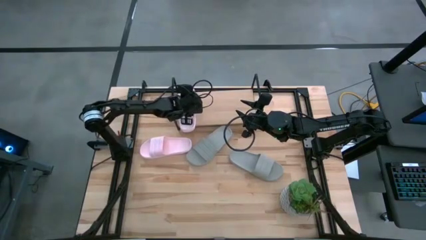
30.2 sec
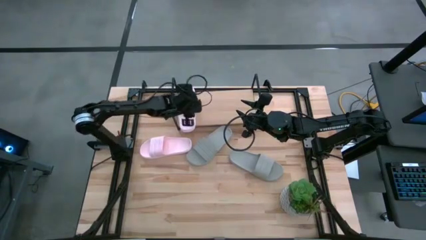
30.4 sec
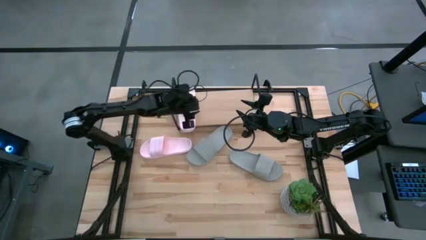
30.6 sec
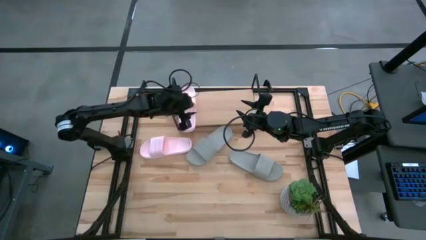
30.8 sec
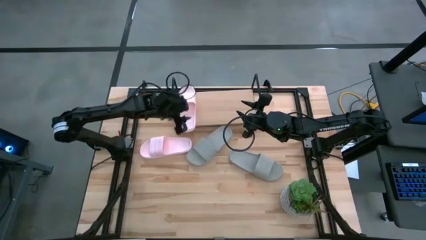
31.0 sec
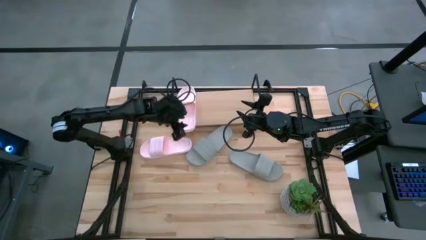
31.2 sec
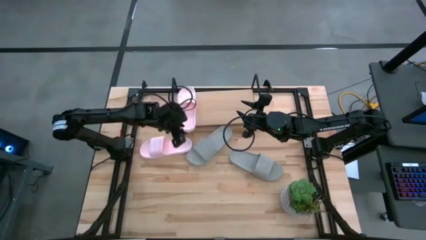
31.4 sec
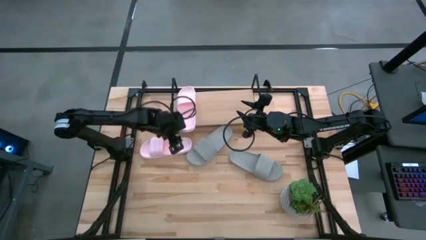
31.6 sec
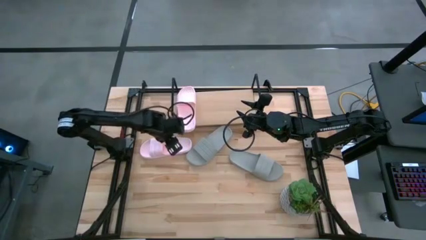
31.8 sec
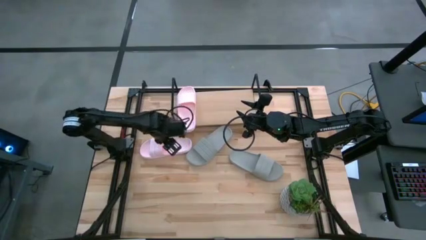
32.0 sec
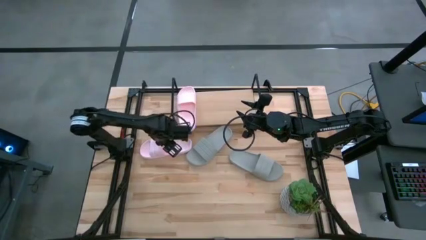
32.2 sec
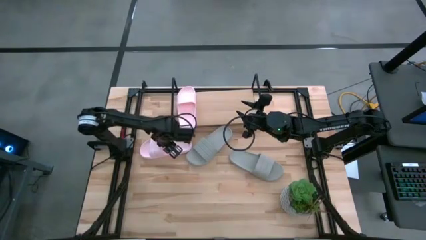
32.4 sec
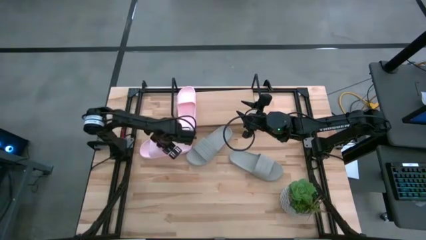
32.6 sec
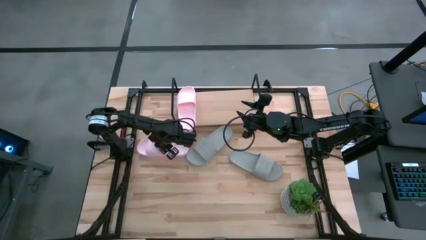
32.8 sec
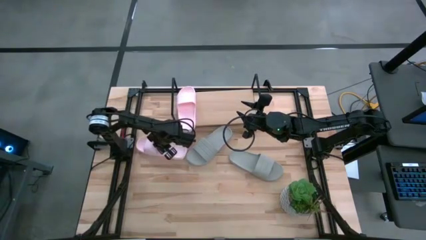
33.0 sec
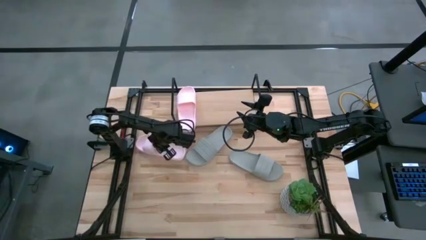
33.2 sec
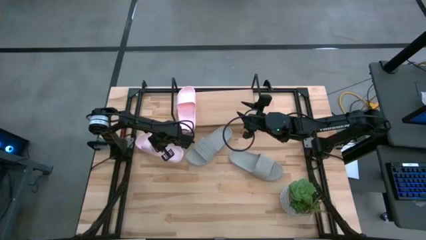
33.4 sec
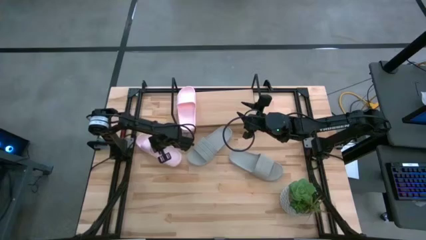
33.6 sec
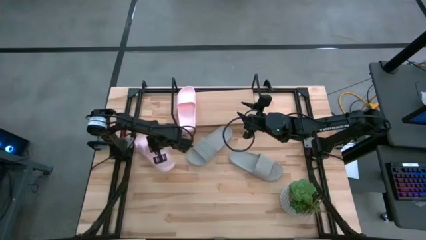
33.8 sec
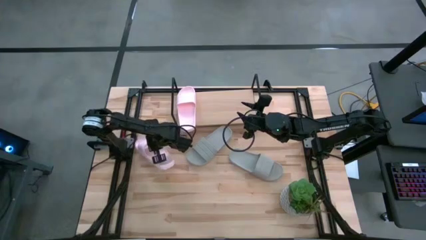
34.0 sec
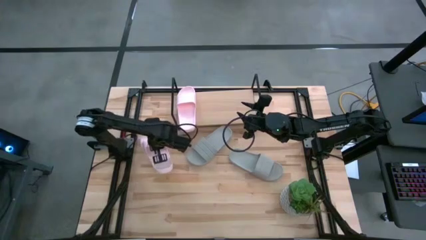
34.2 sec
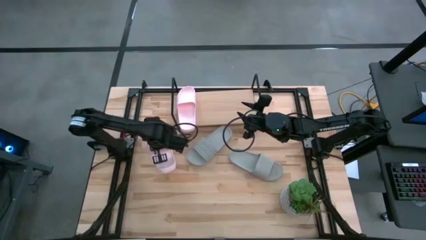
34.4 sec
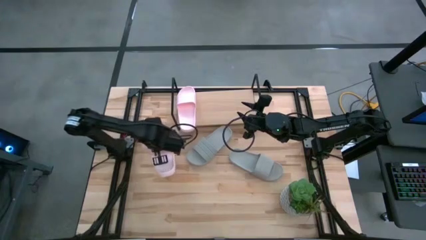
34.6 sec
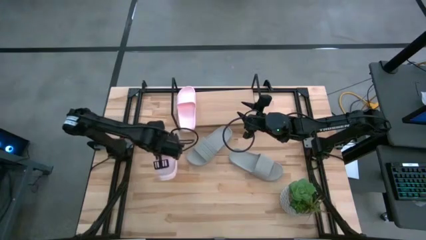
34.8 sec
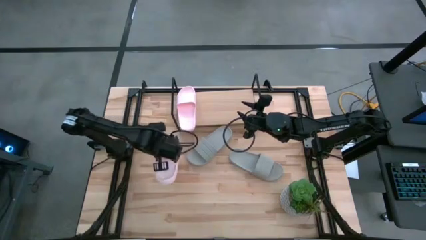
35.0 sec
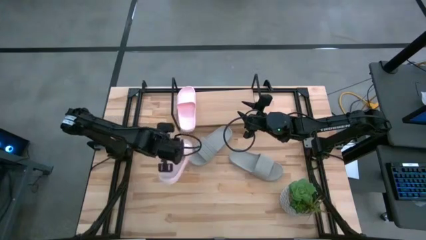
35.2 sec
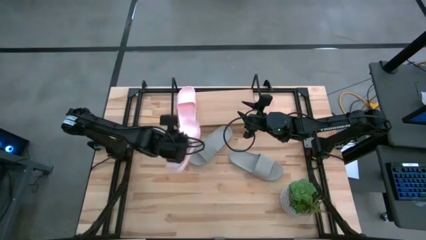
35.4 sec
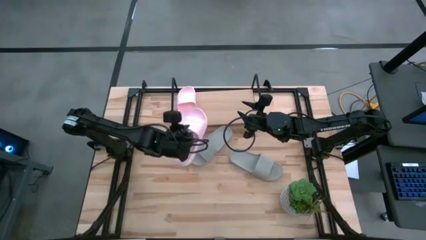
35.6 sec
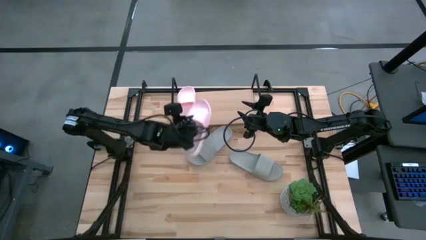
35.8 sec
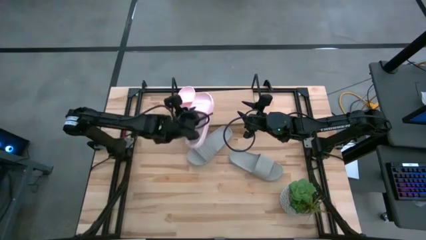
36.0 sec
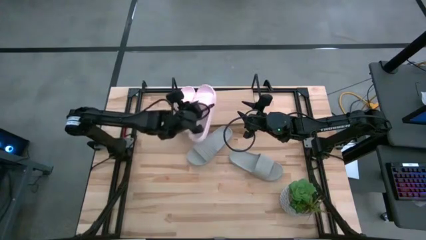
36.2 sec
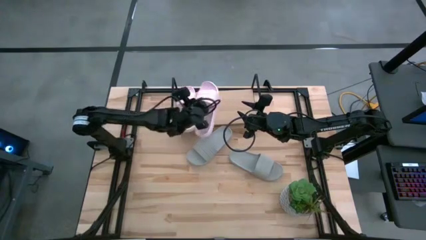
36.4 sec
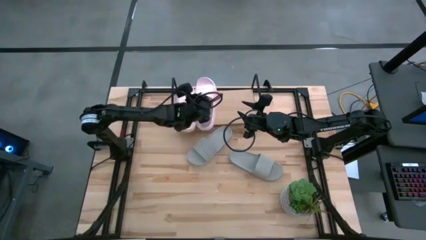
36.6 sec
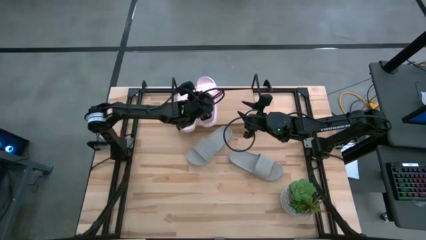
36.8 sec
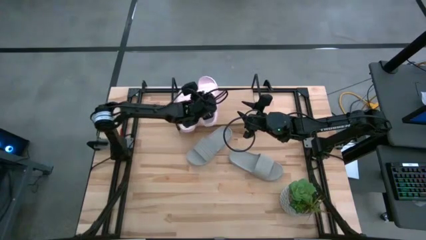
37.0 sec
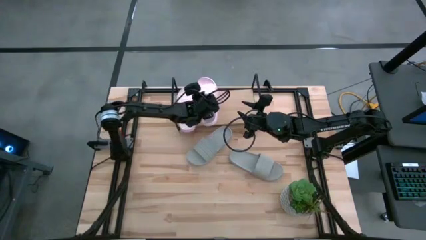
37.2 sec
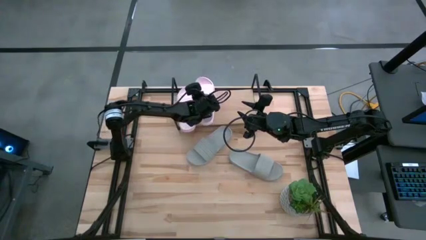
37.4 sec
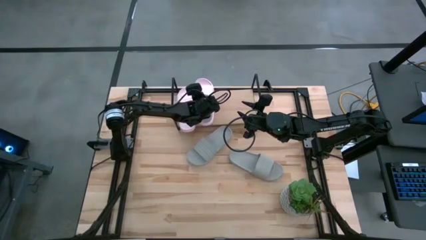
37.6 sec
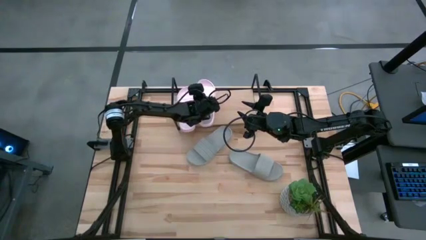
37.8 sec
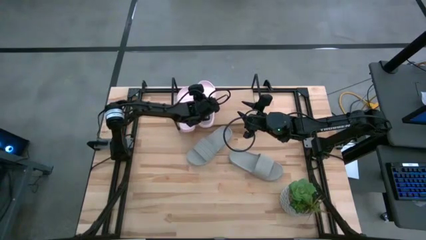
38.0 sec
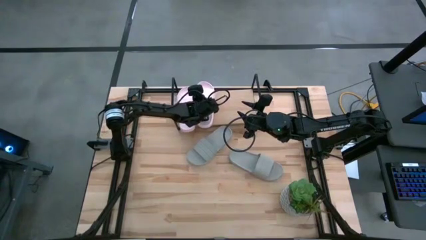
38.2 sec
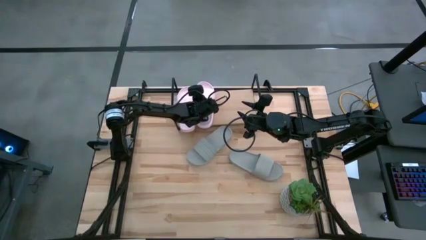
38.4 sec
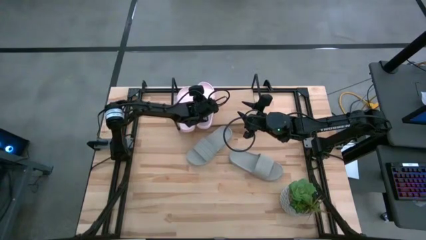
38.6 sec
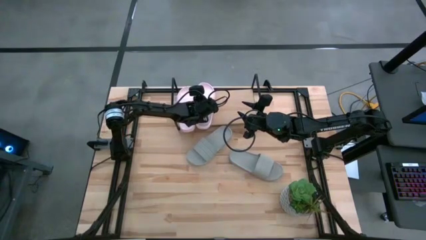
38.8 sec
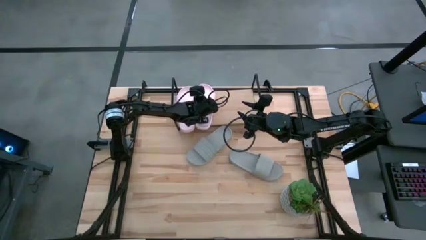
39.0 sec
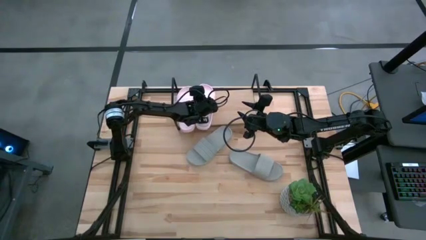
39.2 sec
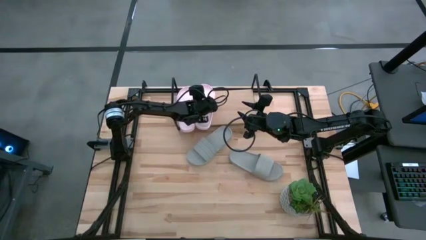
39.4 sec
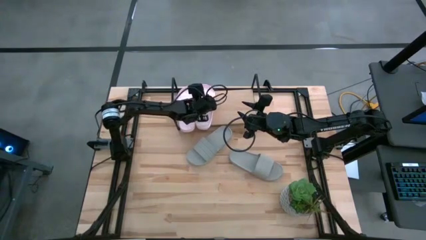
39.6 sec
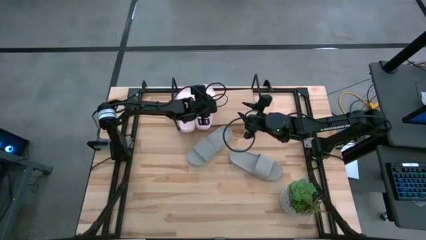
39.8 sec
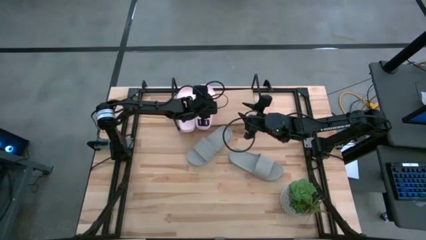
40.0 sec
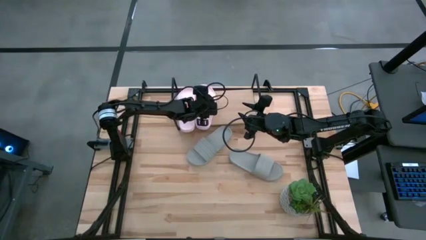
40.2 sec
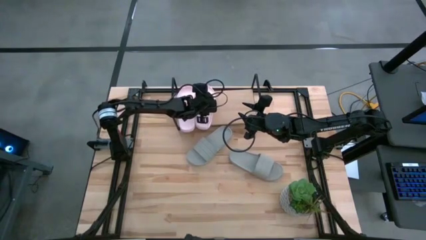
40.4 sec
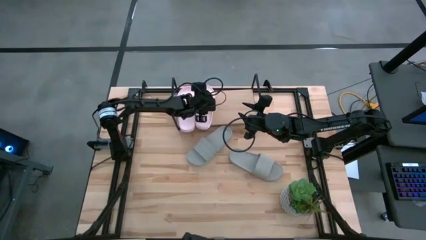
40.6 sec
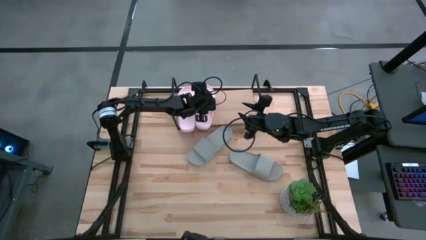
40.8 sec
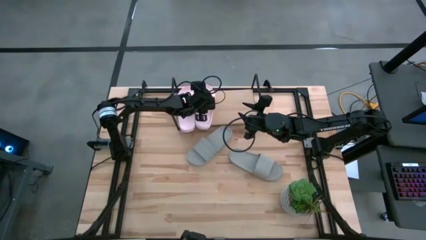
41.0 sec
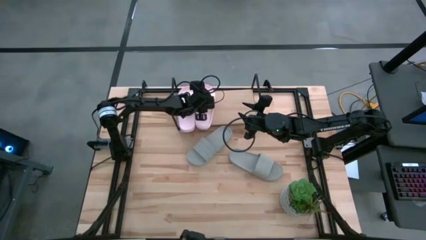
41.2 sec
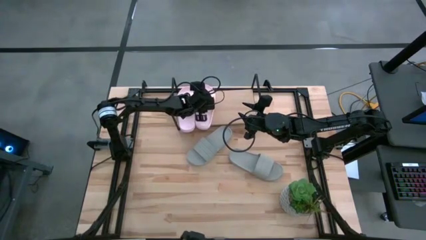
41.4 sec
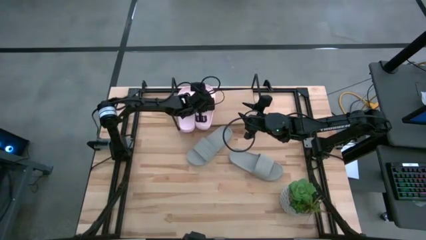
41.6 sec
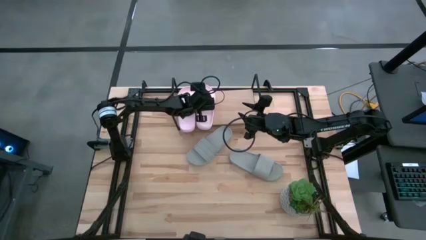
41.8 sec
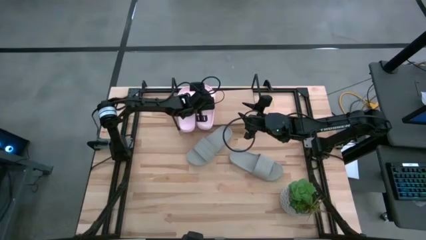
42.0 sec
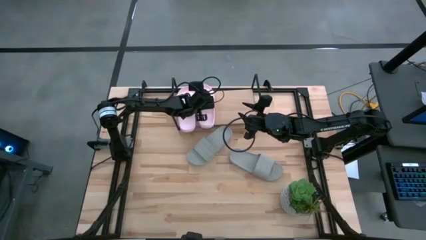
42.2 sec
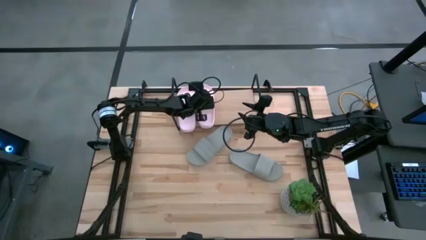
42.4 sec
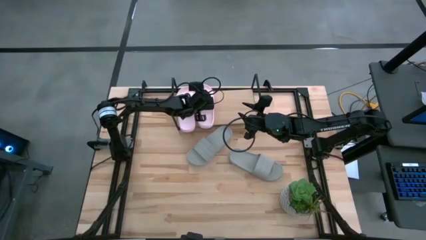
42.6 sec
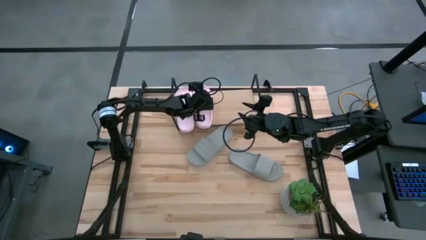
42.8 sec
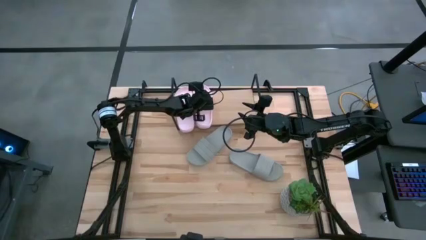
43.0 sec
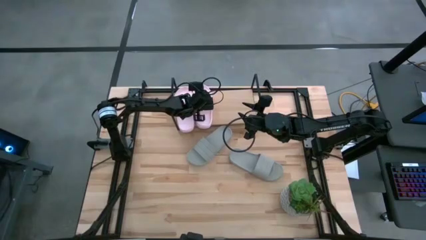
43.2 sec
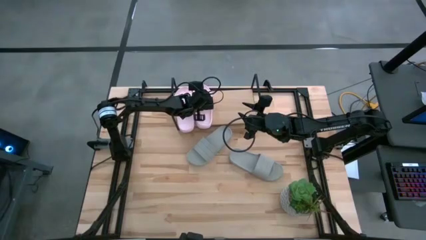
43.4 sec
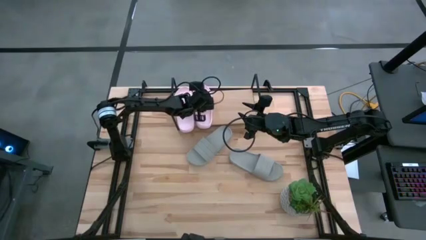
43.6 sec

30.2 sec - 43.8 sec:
Task: Pick and place slides into the shelf
Put the pink slides on the shelf

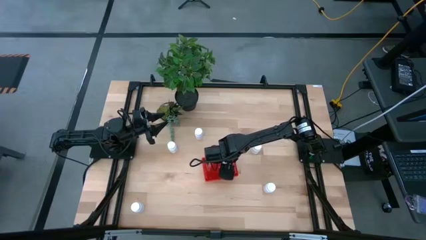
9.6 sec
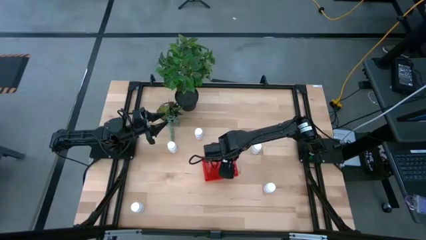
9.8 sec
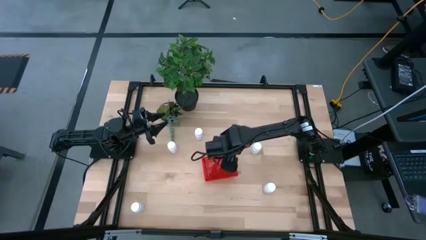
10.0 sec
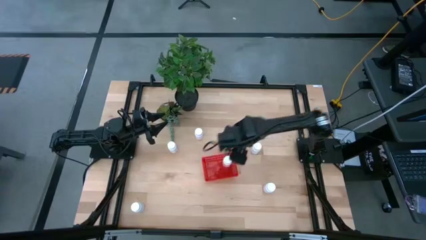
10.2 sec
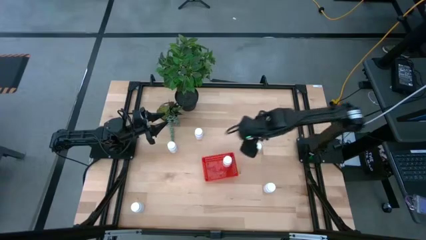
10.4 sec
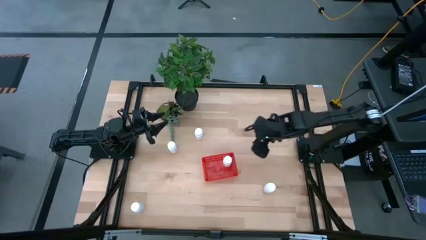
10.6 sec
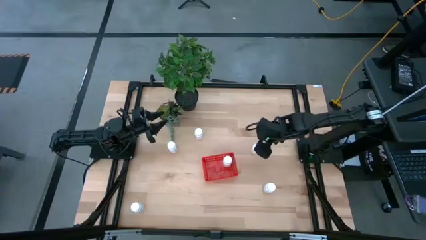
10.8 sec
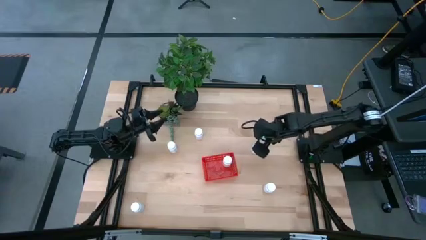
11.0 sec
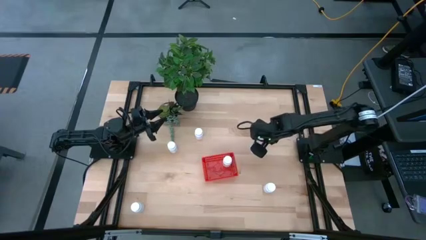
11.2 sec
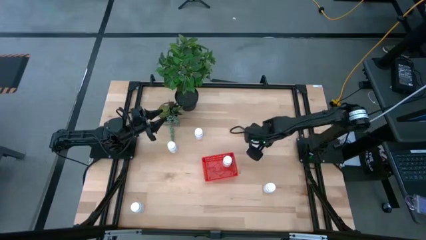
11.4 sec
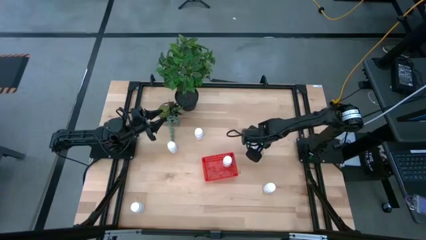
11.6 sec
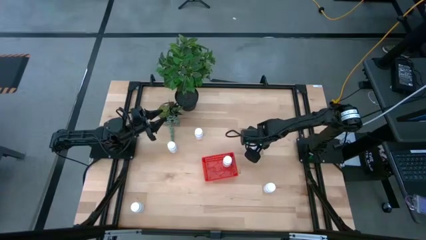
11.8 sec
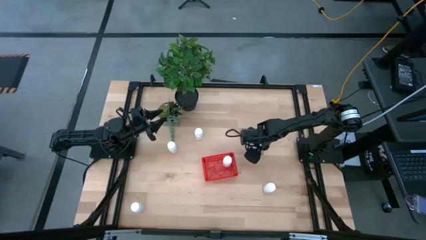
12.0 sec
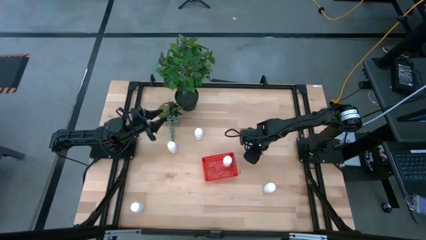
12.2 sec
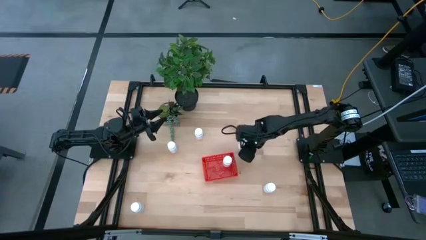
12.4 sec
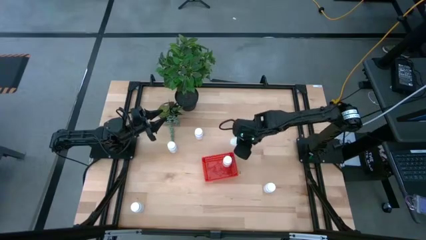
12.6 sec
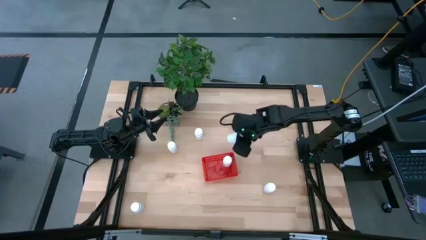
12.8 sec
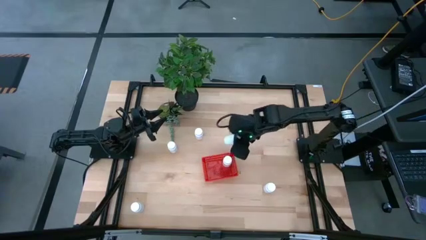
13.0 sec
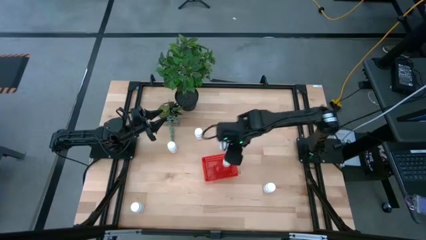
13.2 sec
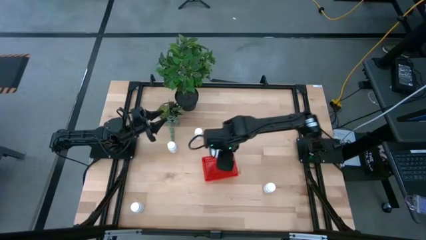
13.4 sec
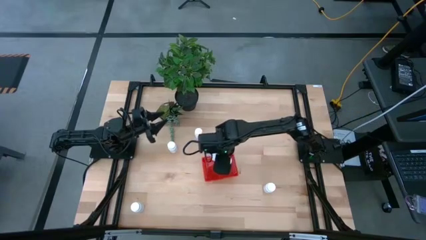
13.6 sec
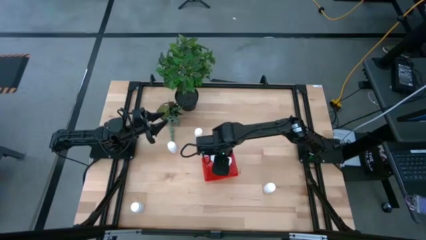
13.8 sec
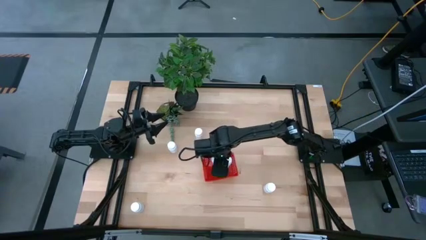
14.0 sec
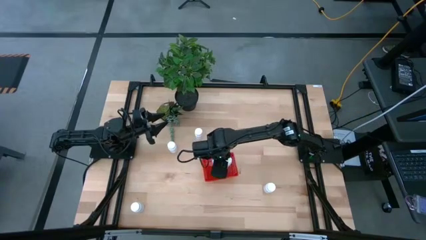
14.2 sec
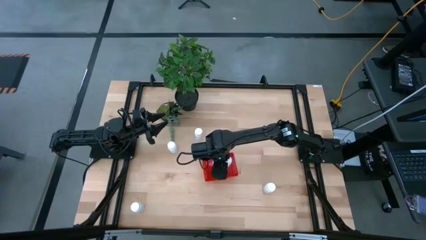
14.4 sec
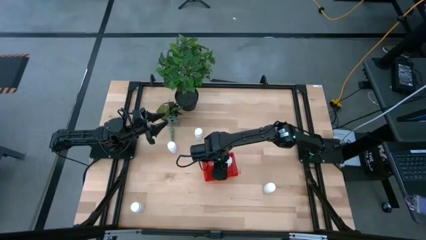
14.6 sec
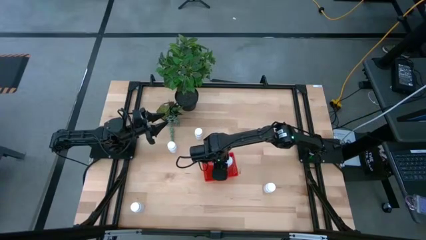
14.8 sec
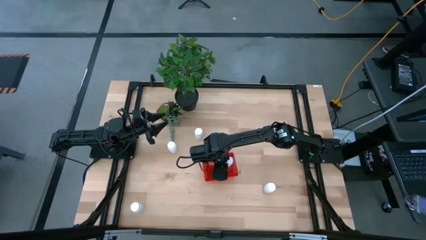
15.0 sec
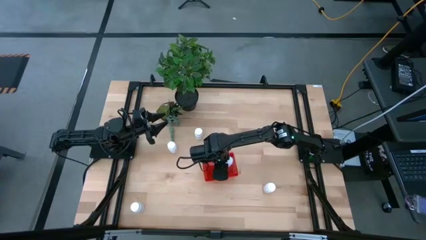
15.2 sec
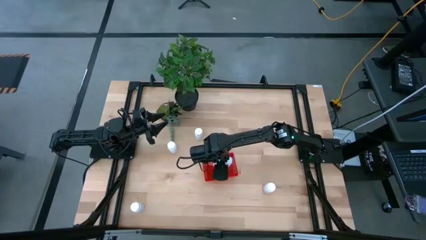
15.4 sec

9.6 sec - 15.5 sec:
Task: Pick and place pill bottles into a basket
Put the white pill bottles into the red bin
